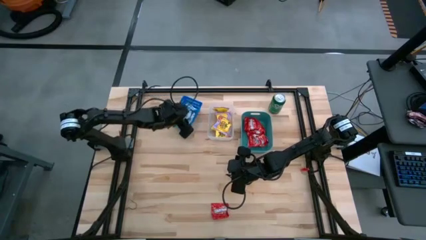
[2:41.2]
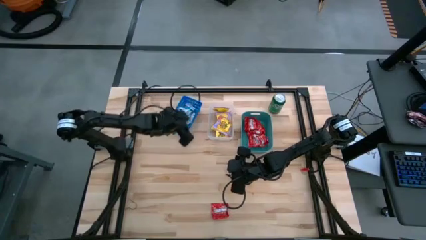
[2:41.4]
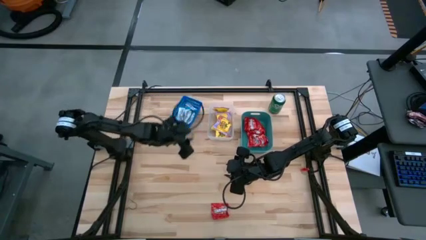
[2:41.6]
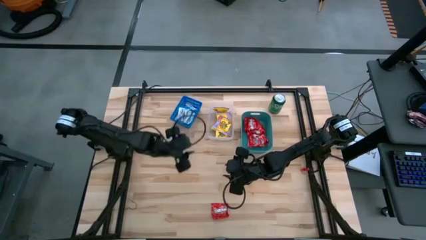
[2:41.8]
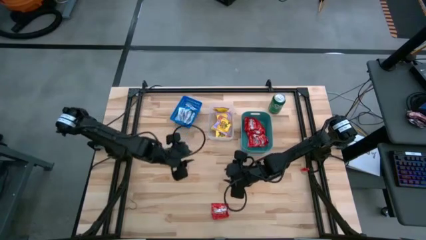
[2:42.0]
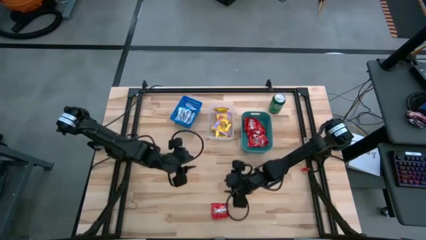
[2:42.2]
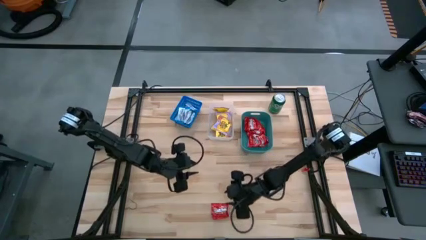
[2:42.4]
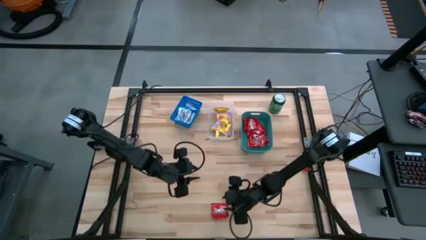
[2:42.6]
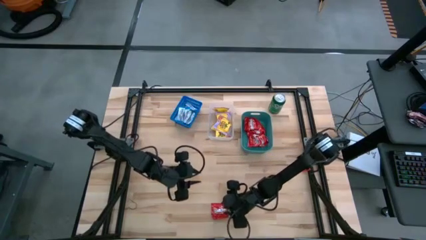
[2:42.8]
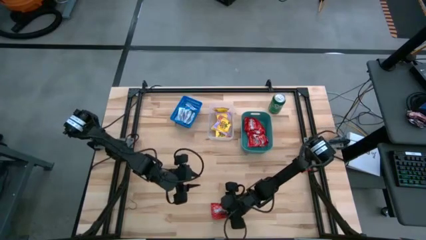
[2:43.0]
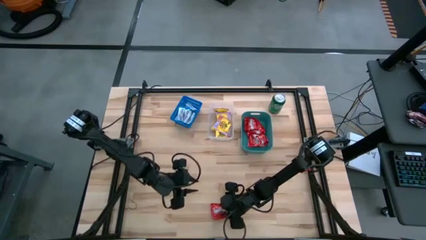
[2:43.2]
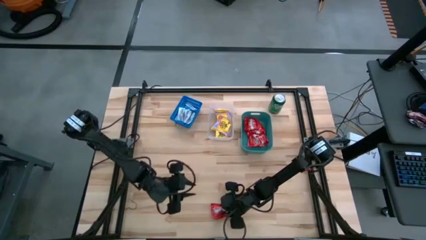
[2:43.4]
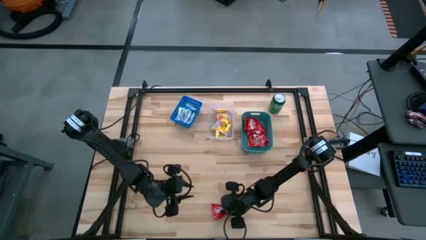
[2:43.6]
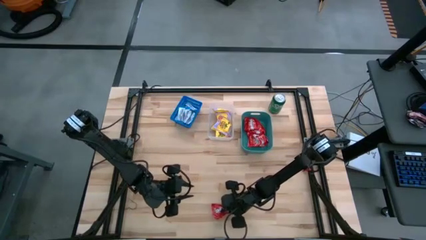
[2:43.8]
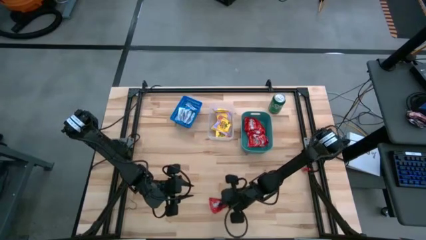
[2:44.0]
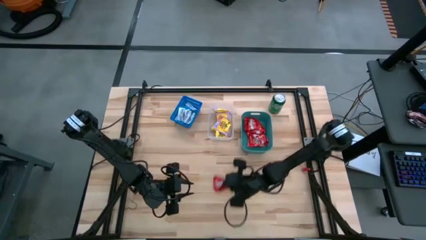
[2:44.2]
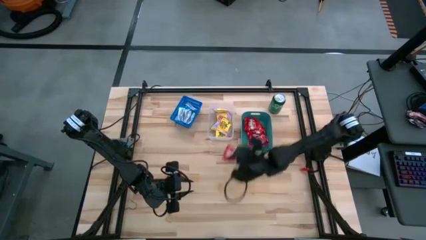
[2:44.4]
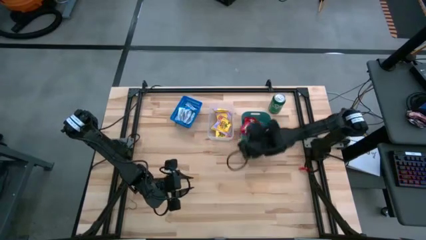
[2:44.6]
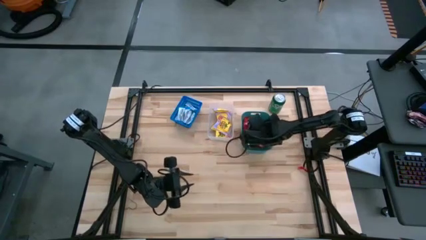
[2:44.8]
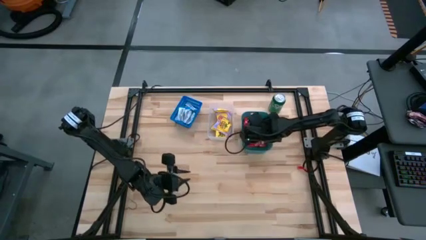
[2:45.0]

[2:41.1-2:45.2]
Task: Sort candy
Put the red candy into the green bin

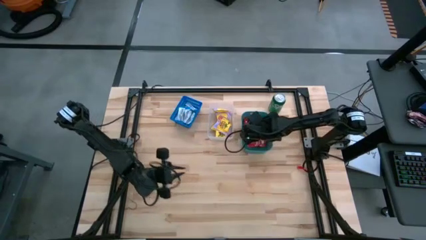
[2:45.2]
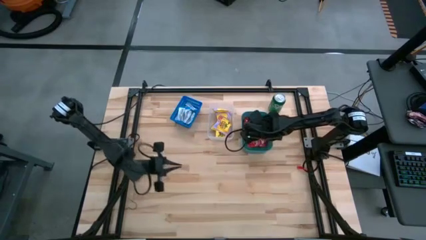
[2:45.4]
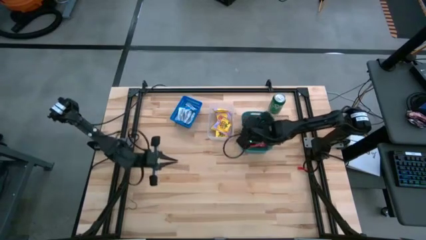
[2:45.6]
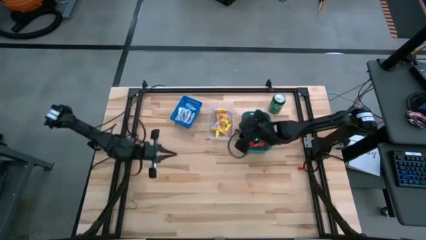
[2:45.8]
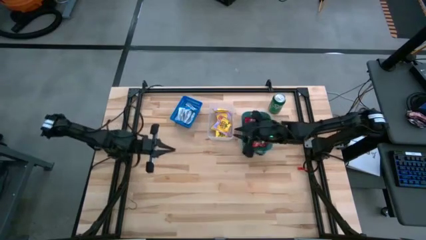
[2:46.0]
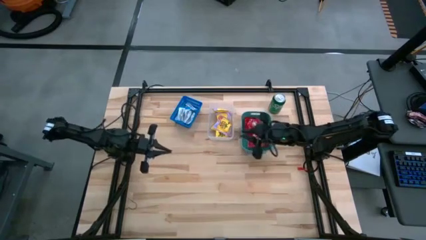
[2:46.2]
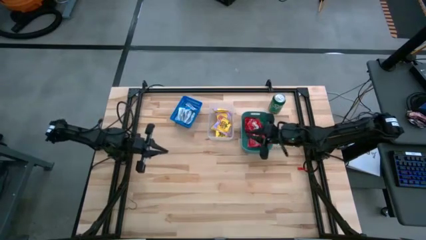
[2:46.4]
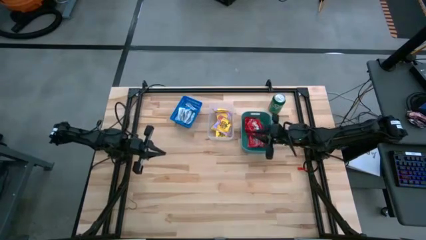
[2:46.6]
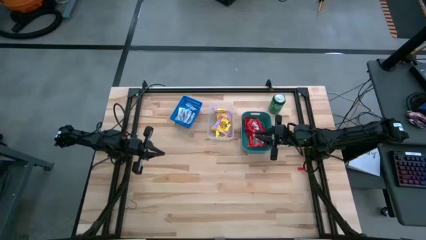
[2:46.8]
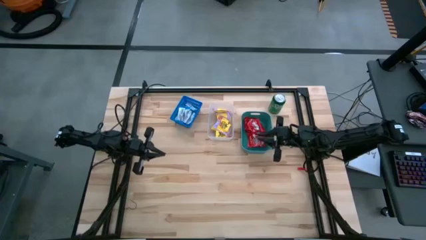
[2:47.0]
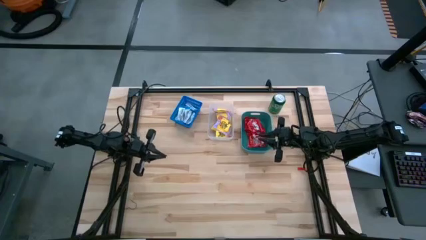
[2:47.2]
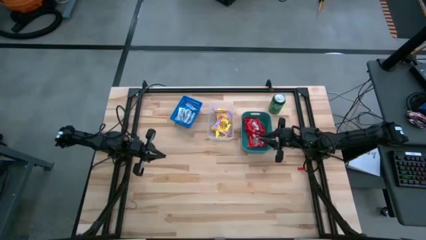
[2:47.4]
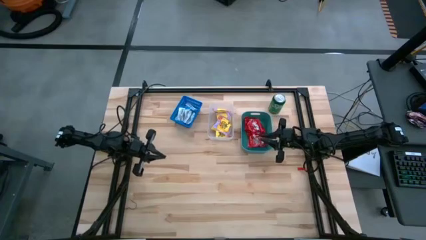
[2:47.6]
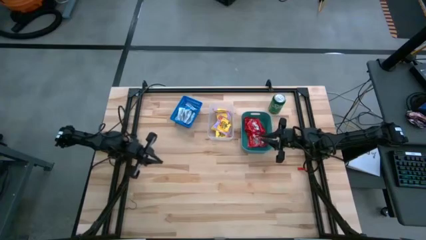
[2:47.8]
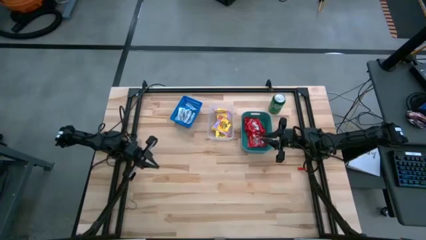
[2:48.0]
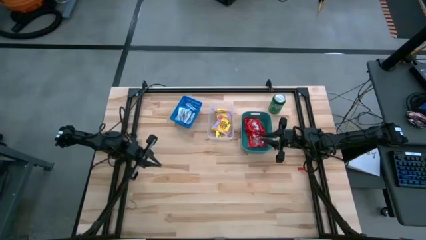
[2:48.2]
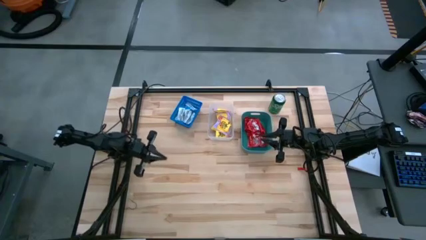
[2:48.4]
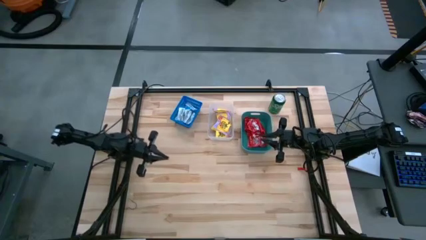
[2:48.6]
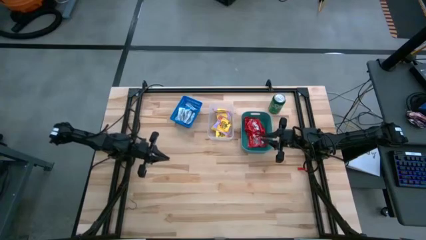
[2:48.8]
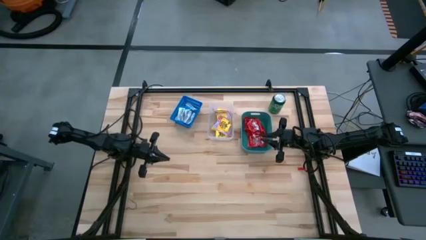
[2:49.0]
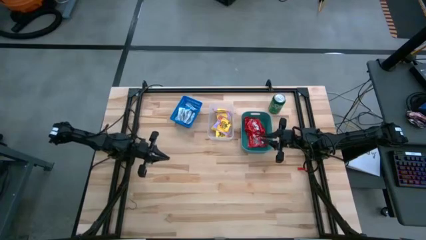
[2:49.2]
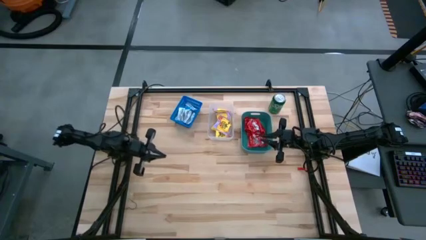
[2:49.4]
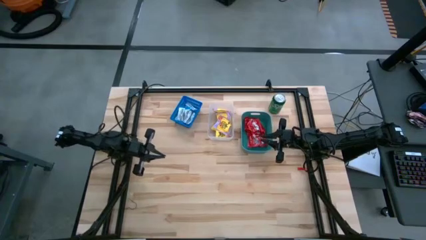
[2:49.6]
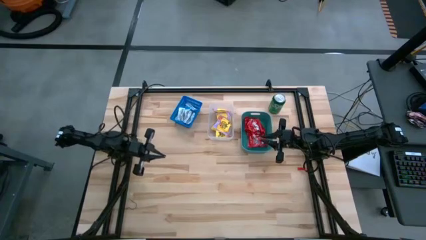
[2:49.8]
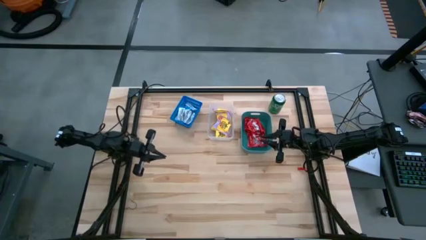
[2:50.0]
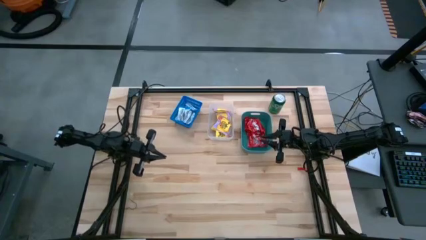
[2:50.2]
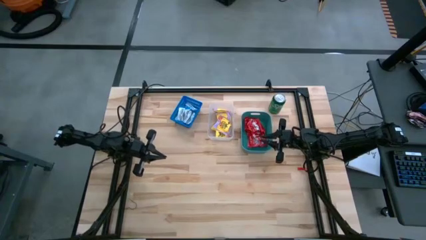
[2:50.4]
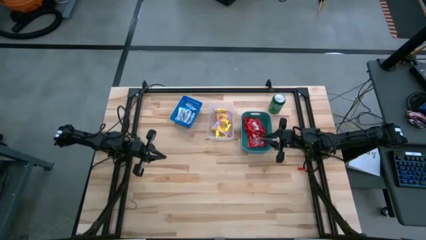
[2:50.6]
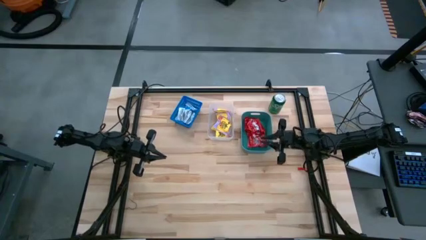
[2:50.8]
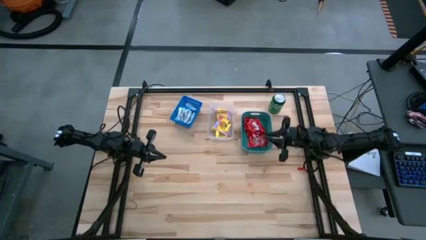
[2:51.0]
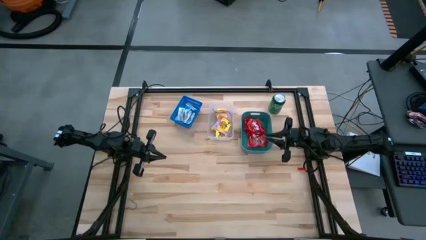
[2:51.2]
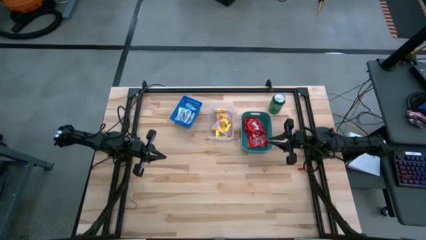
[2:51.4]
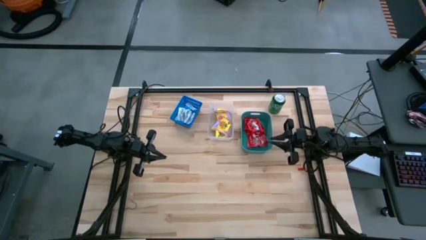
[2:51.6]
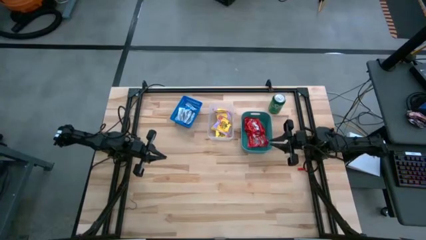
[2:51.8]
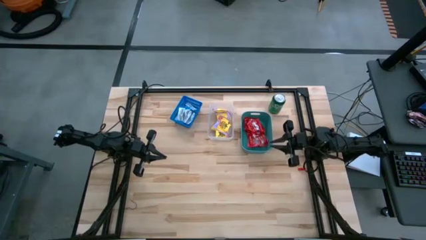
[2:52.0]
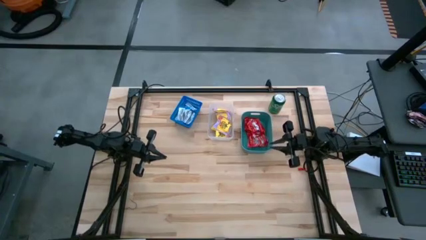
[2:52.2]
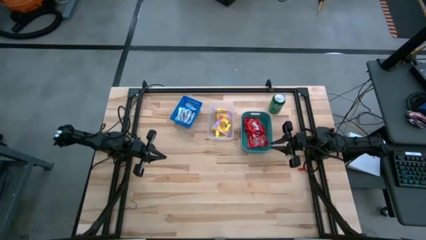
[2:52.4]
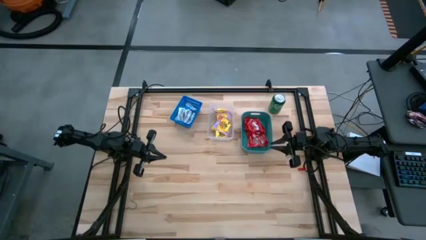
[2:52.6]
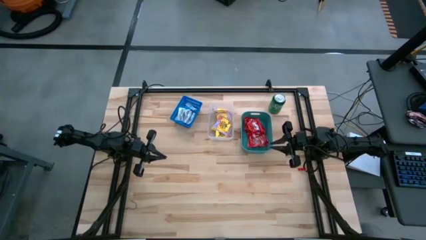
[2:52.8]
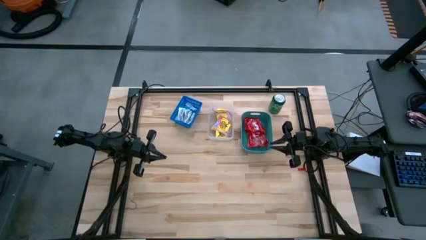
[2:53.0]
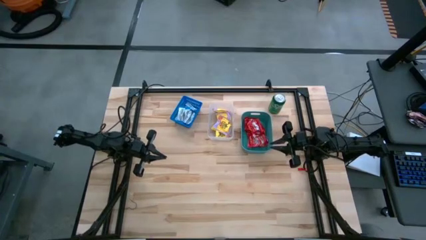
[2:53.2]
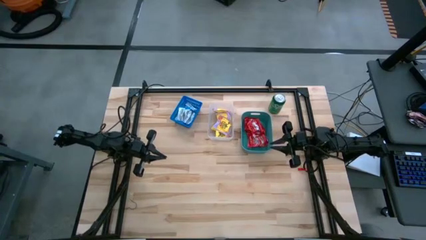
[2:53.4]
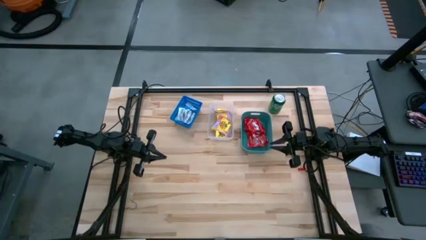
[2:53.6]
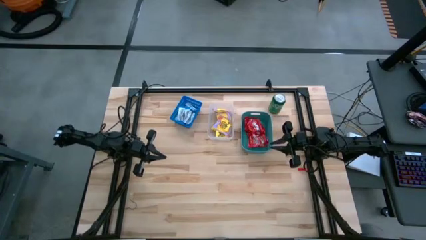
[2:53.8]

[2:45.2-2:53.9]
Return to Home Position
